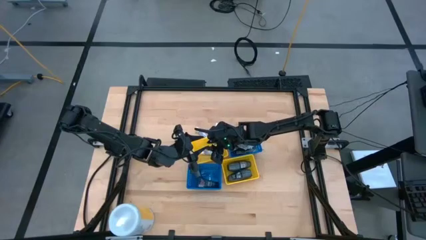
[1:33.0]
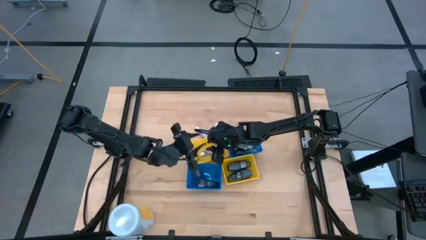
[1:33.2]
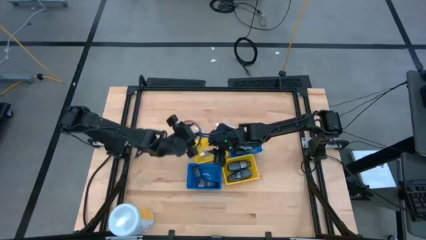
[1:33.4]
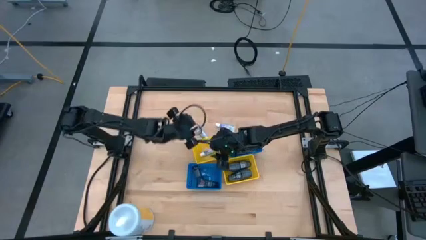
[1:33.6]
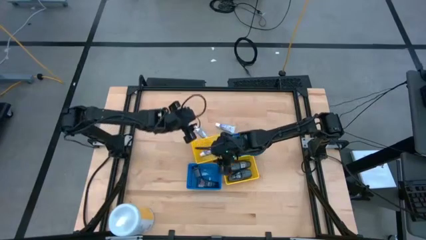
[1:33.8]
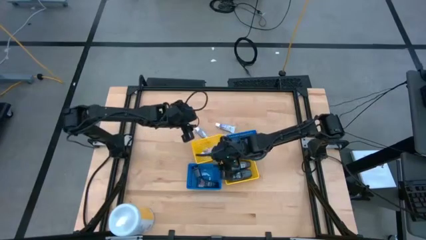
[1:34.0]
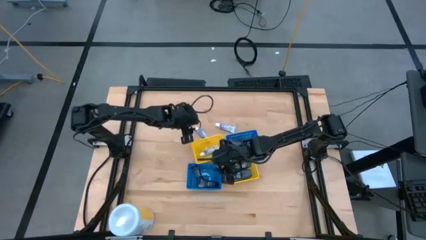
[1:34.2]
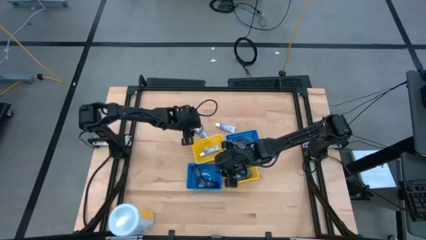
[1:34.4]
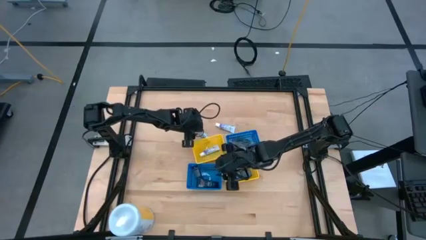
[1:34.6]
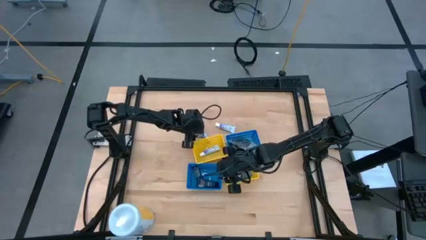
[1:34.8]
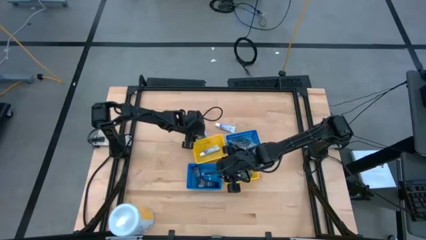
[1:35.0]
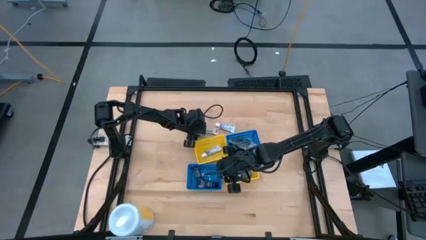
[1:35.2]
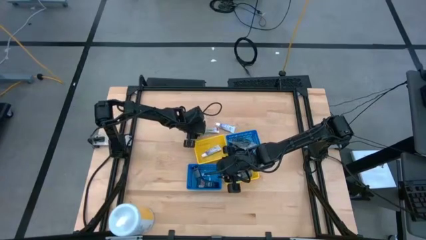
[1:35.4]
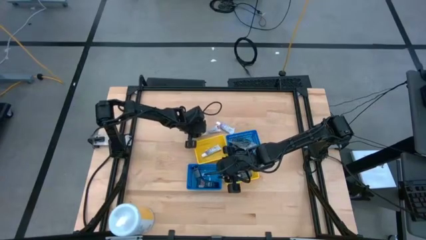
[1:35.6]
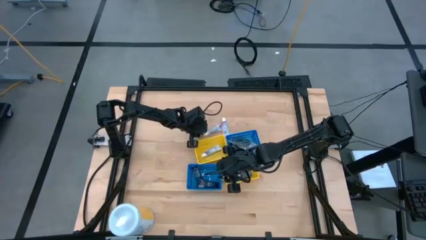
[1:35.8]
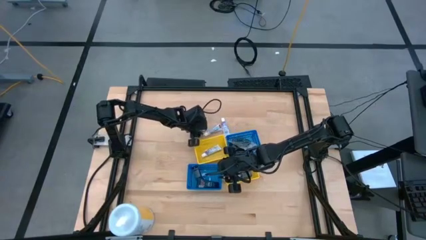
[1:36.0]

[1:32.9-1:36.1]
Task: Pick & Place Travel size toiletries
Put the left toothpaste in the top yellow bin

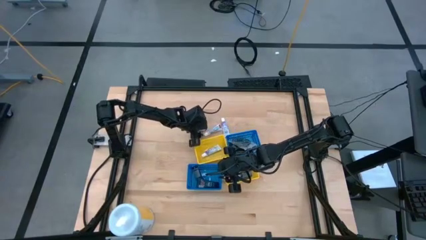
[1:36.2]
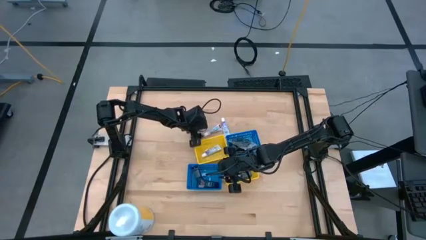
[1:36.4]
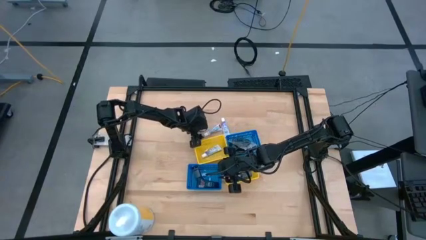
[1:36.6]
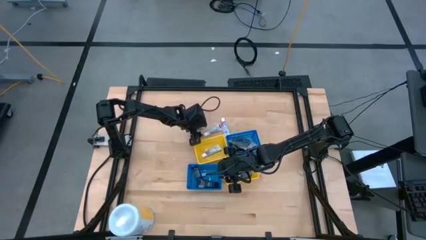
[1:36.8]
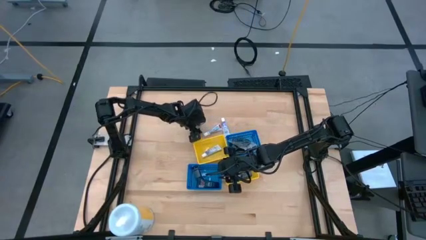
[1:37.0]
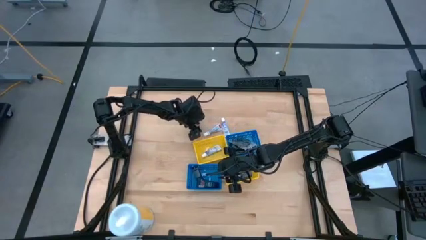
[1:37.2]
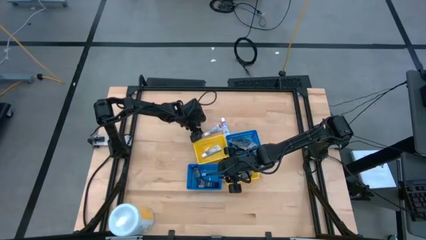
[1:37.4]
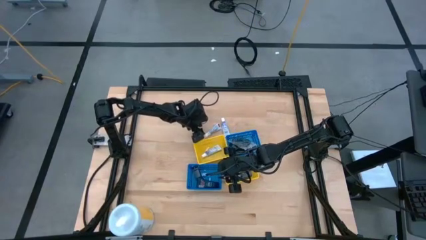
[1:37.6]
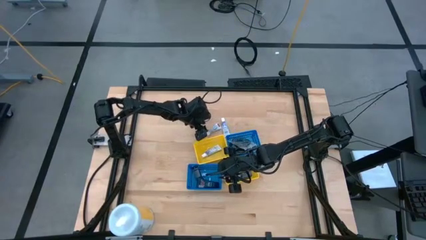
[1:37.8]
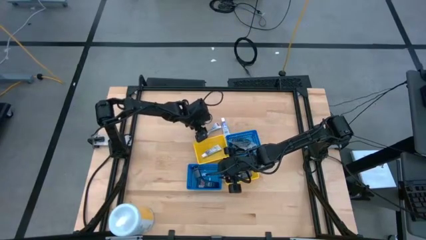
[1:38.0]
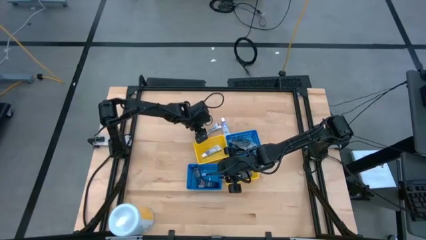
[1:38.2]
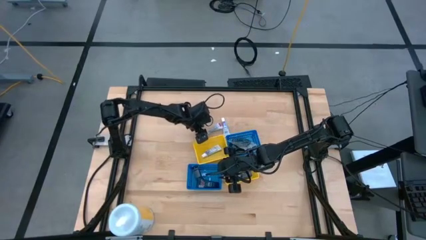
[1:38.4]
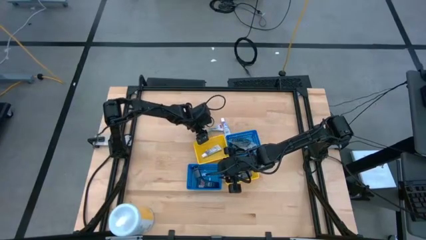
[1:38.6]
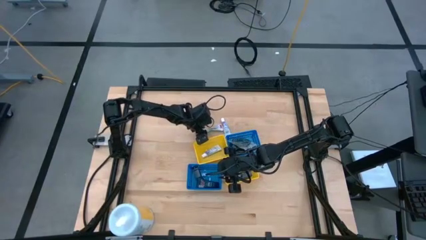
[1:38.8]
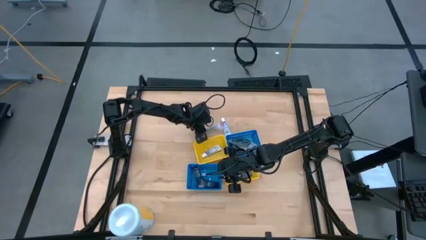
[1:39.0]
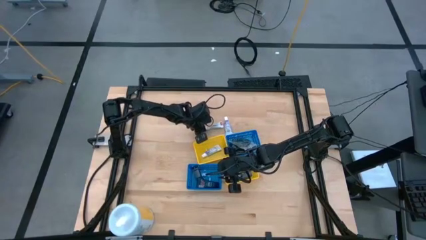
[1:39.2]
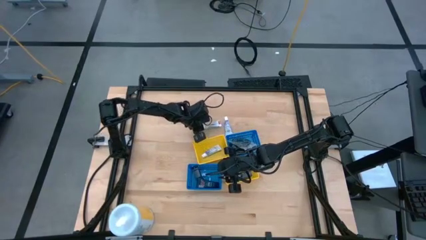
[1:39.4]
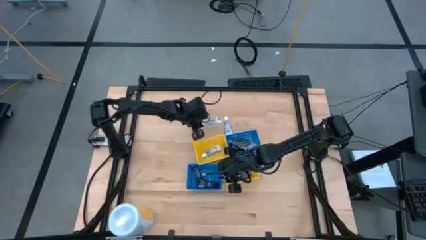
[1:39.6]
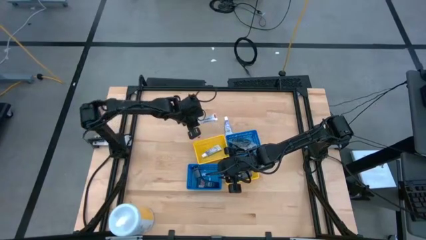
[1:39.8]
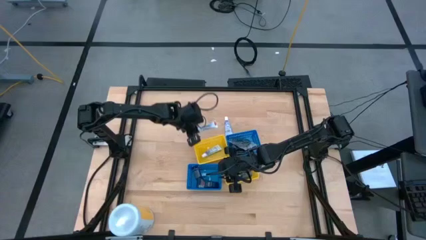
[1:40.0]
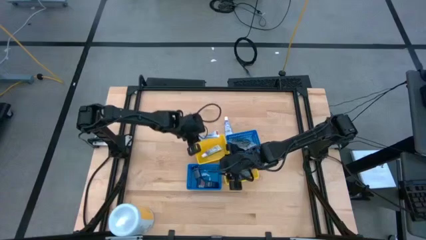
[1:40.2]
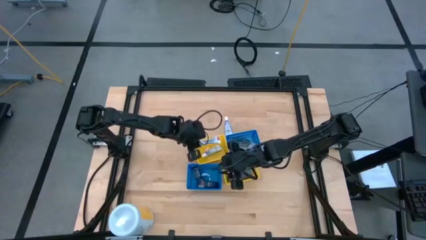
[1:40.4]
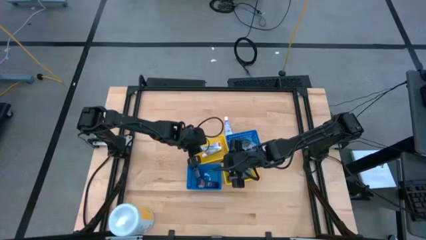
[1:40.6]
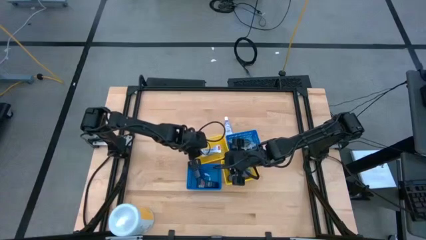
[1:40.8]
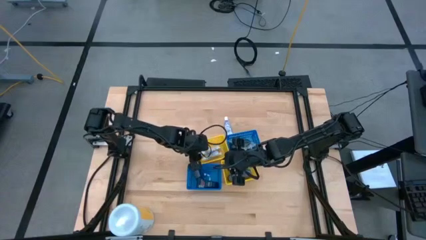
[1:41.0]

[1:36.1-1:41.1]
Put the left toothpaste in the top yellow bin

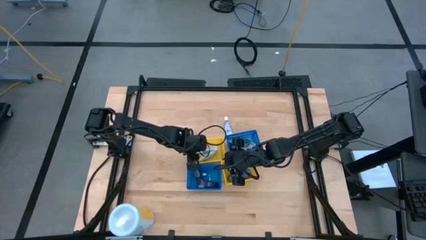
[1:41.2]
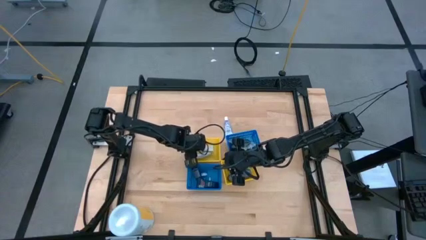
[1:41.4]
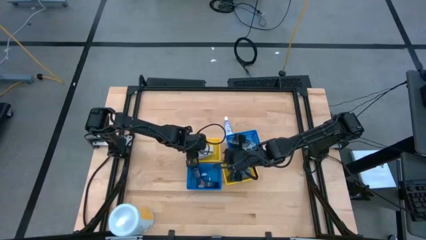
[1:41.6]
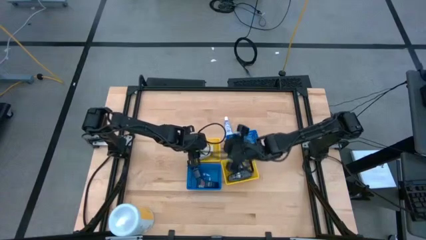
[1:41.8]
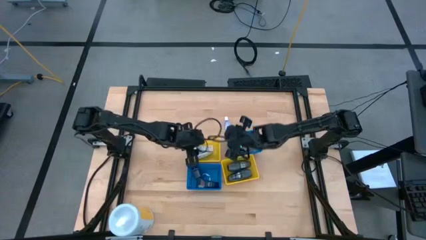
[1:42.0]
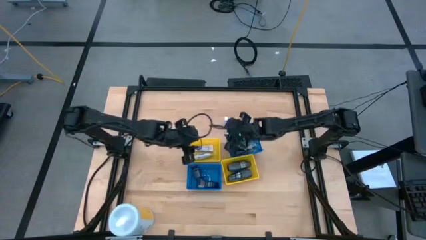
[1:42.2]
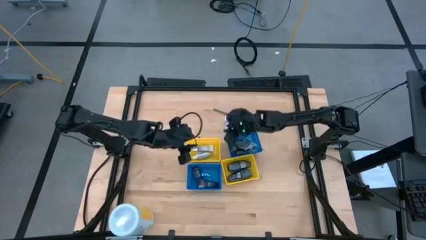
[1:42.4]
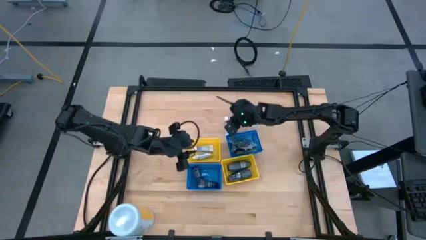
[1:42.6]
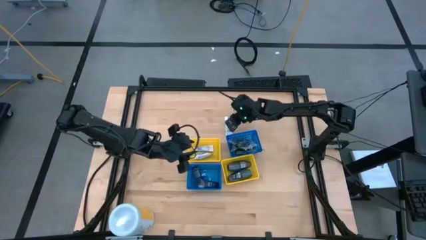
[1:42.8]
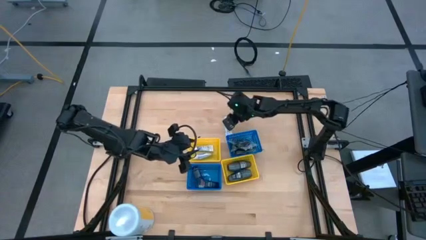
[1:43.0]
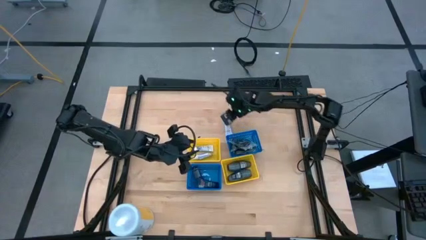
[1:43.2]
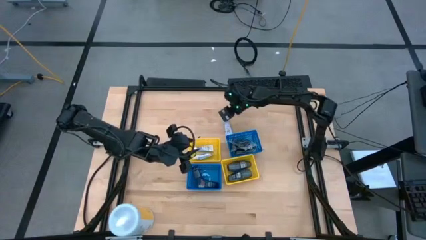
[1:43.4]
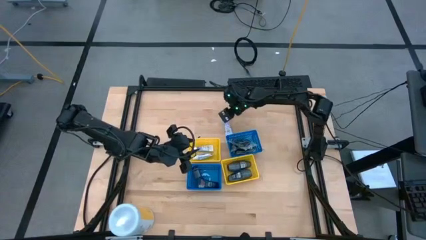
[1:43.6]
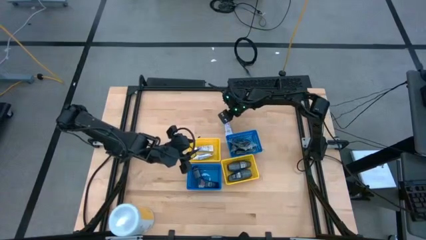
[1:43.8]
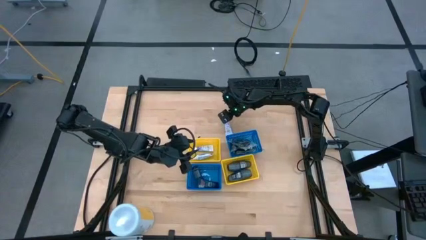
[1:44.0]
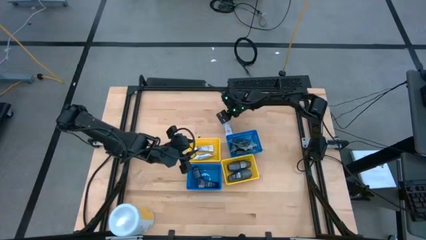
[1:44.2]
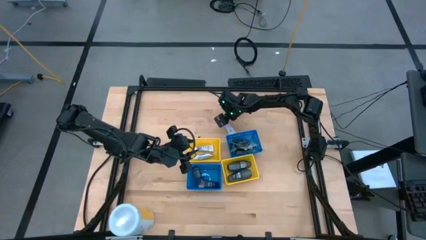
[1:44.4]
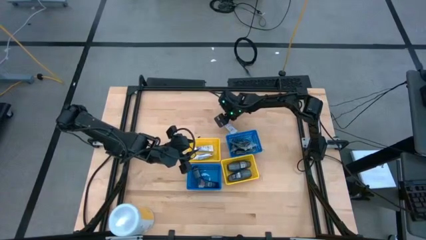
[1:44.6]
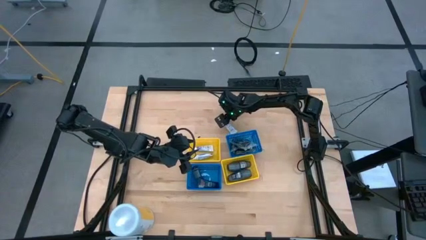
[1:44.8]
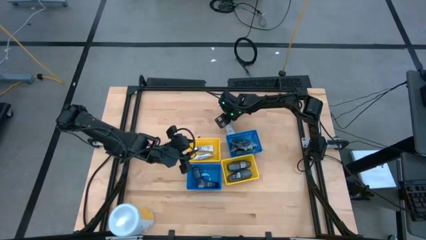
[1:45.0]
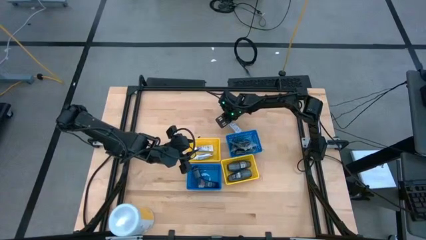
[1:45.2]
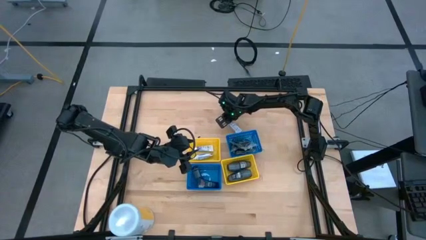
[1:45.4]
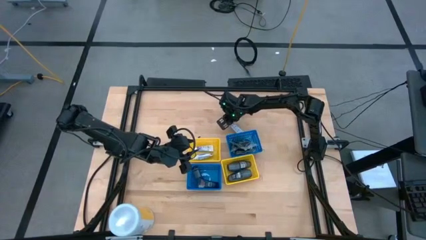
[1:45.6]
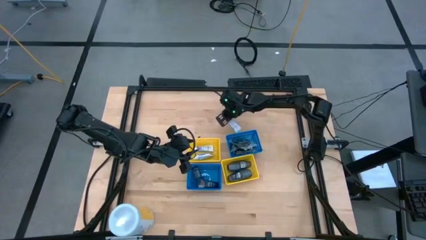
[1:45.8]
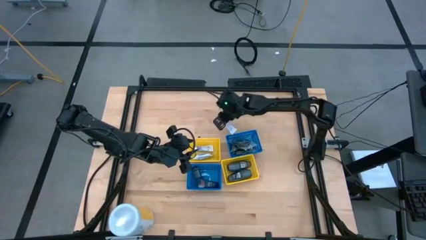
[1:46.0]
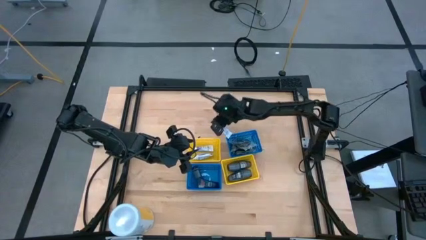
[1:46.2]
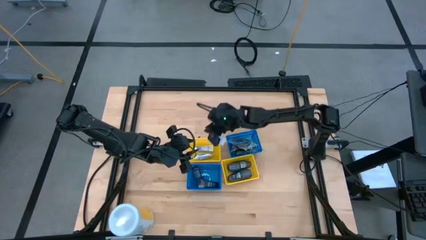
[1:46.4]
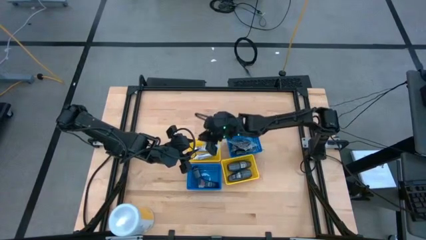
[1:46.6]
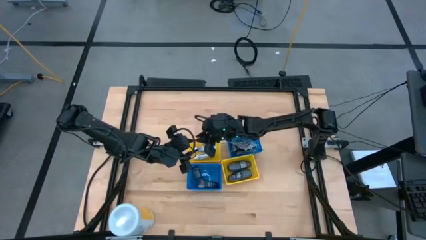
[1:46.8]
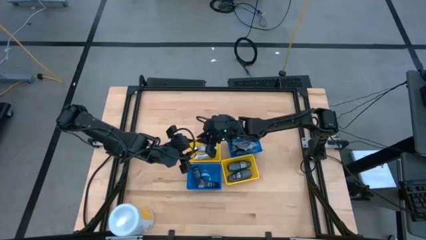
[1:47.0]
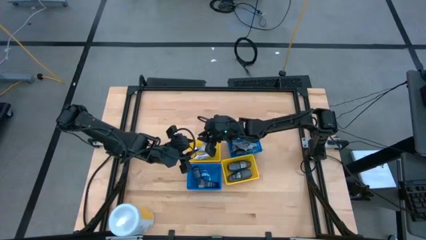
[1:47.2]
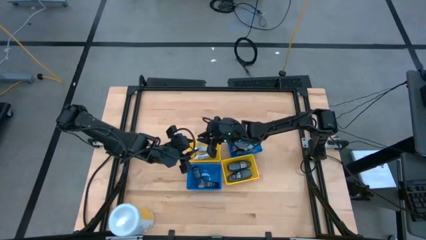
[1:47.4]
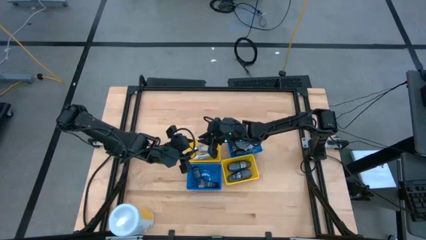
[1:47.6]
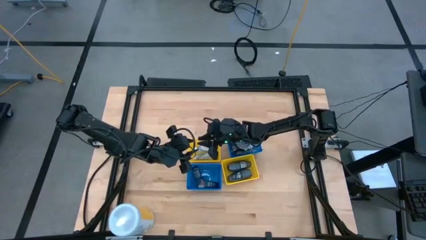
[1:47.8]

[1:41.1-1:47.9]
Put the toothpaste in the top yellow bin
